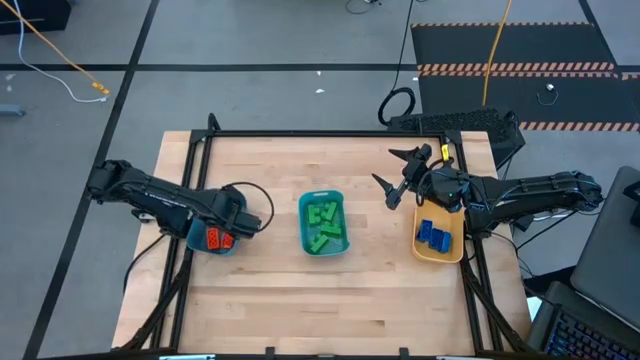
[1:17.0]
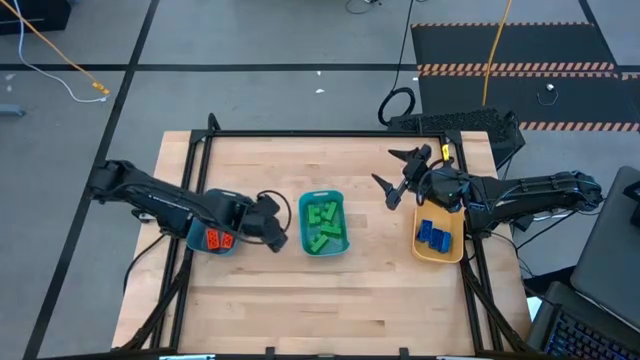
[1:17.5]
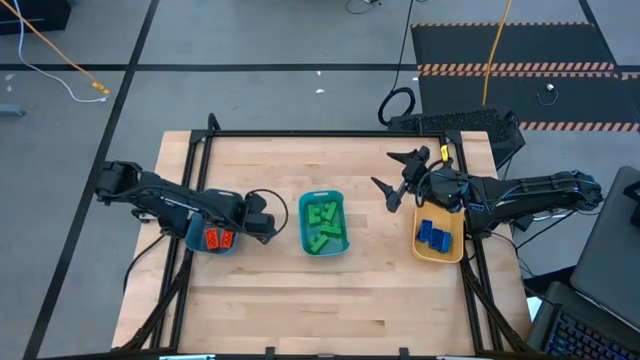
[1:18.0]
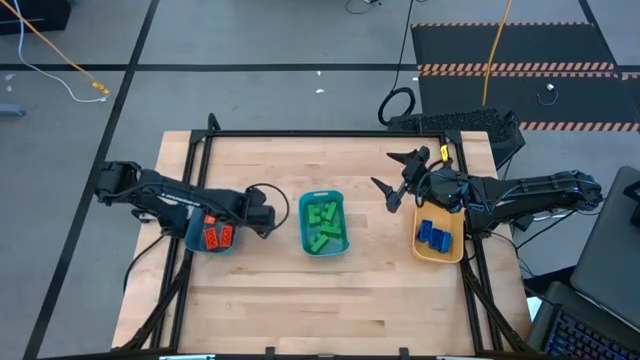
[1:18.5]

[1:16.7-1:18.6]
Task: Sort & place blocks by color
Adjust the dark blue bin

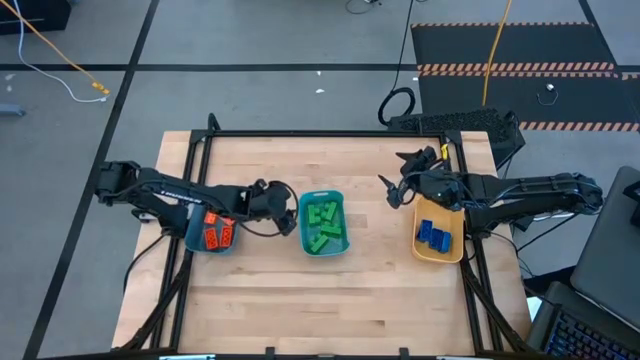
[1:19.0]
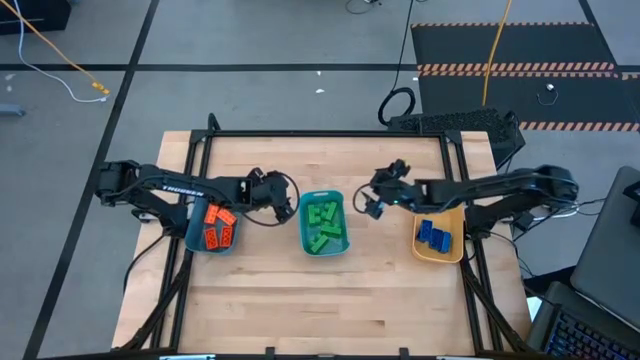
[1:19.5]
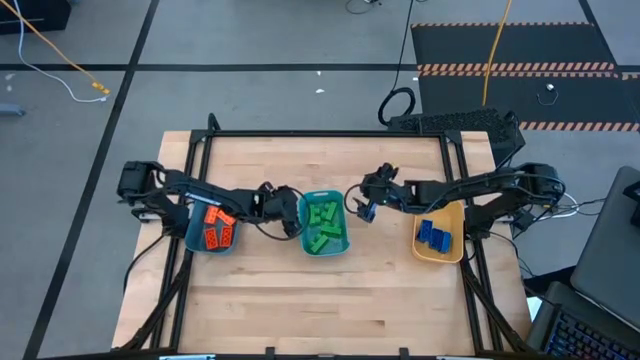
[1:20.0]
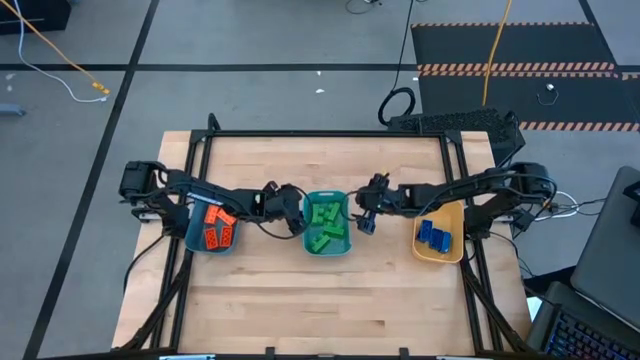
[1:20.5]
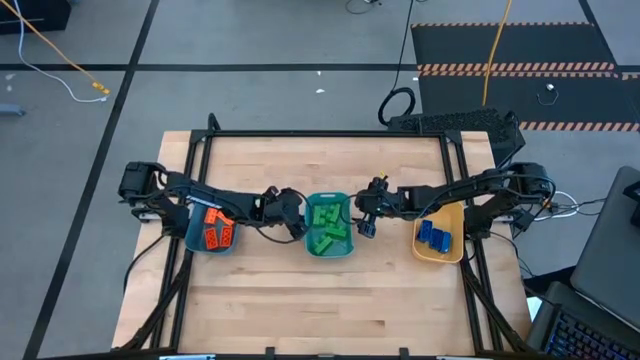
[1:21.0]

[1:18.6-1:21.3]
Adjust the light blue bin

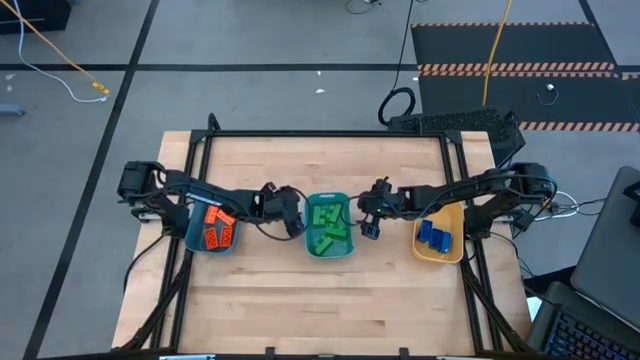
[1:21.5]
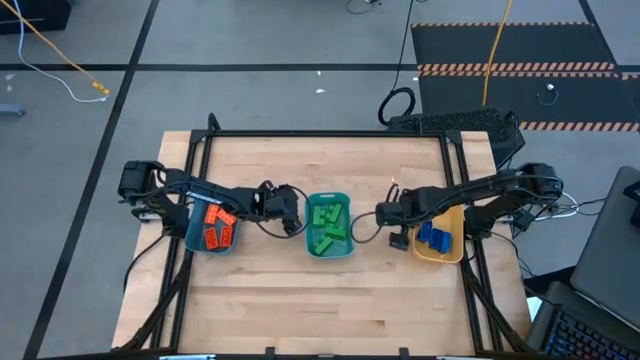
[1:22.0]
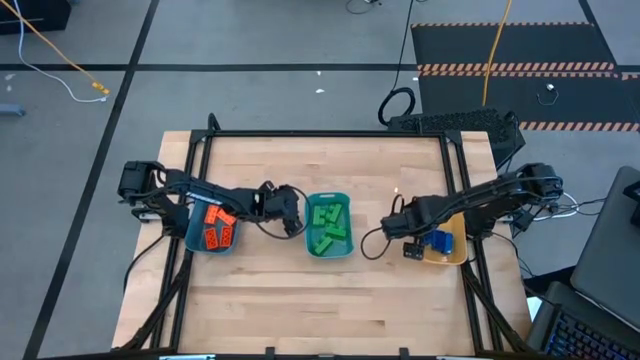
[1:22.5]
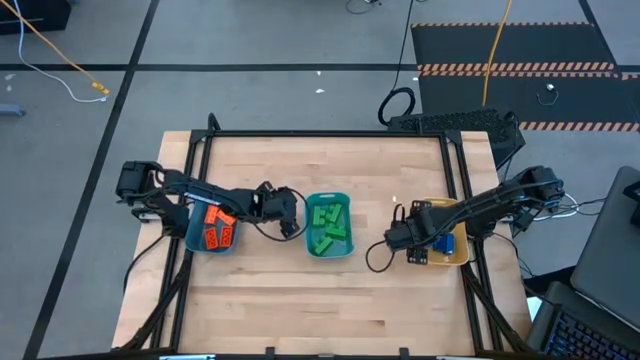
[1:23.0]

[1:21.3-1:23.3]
Adjust the yellow bin

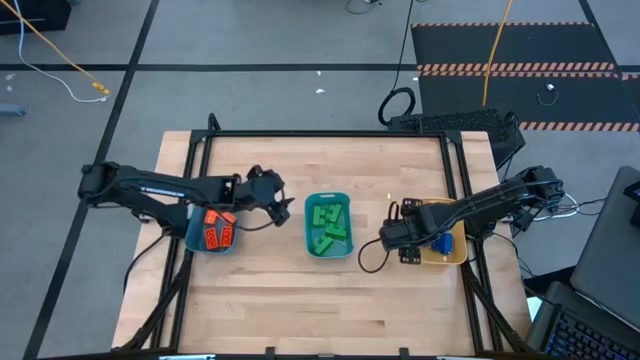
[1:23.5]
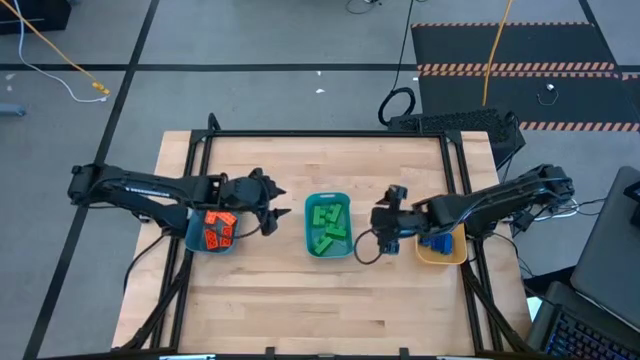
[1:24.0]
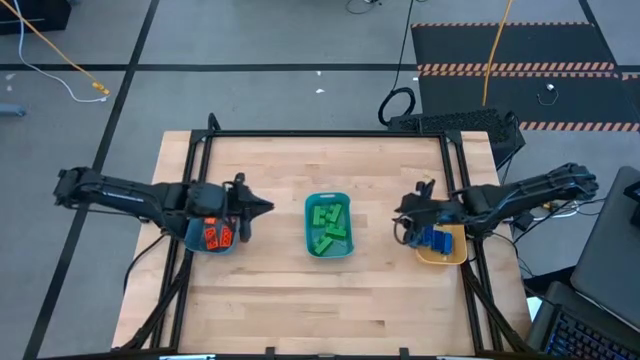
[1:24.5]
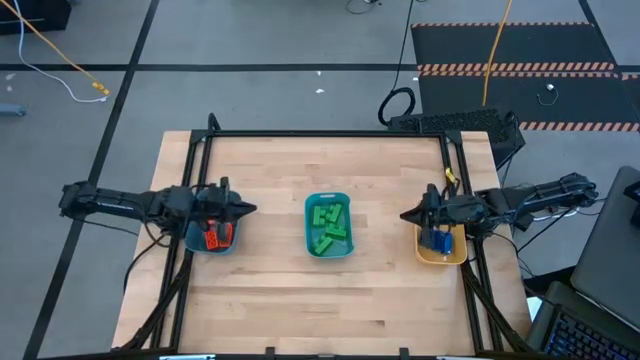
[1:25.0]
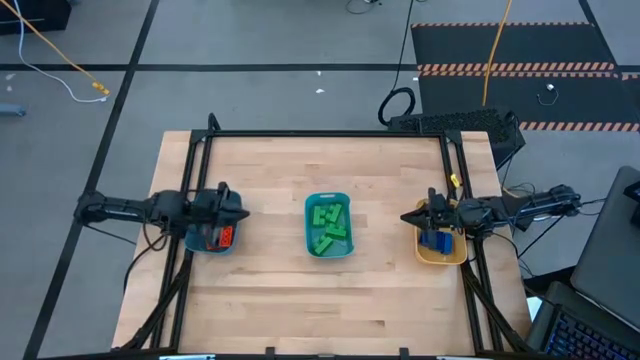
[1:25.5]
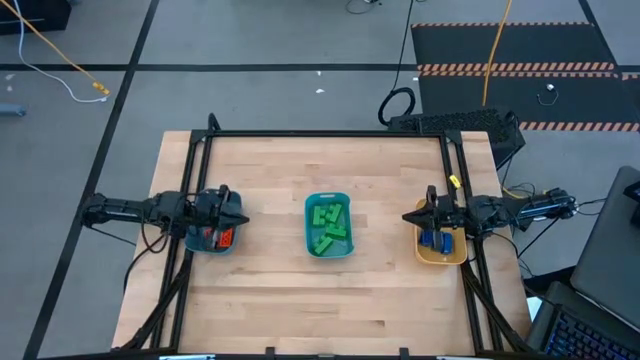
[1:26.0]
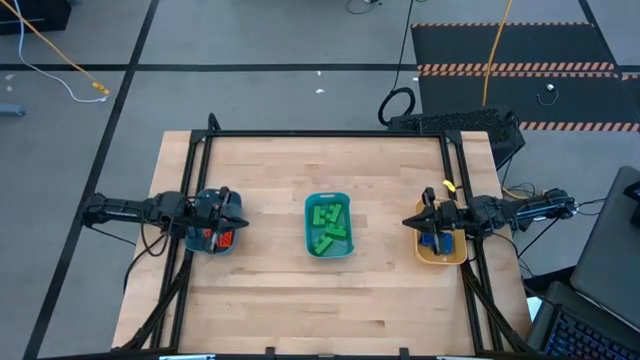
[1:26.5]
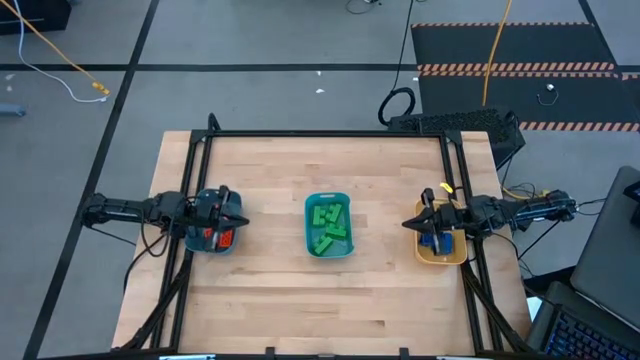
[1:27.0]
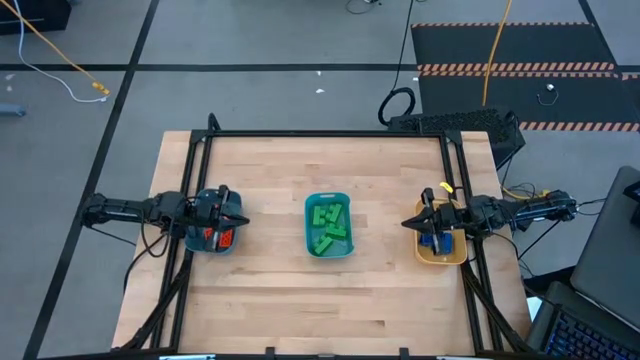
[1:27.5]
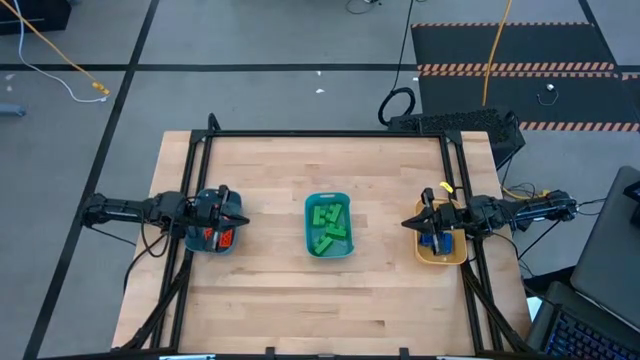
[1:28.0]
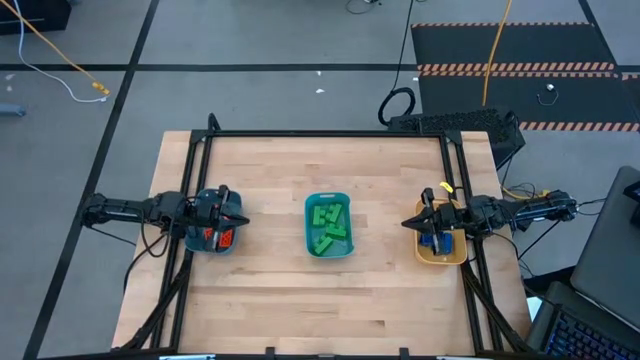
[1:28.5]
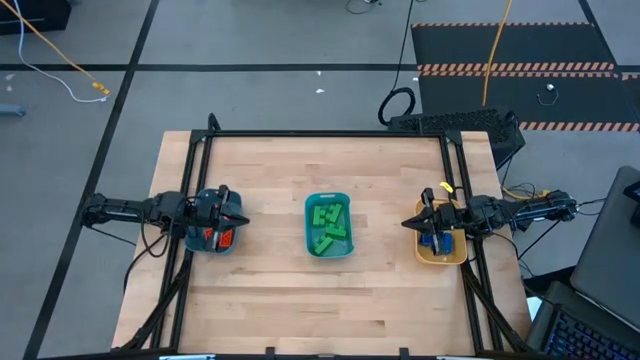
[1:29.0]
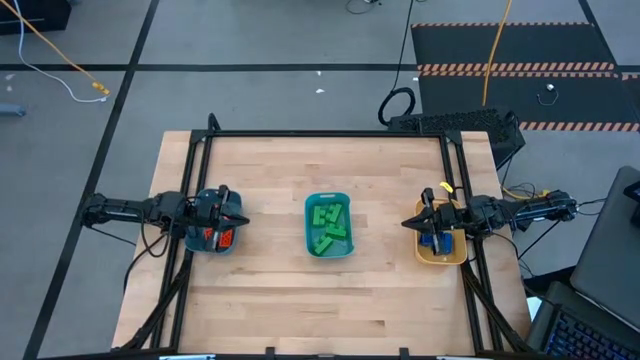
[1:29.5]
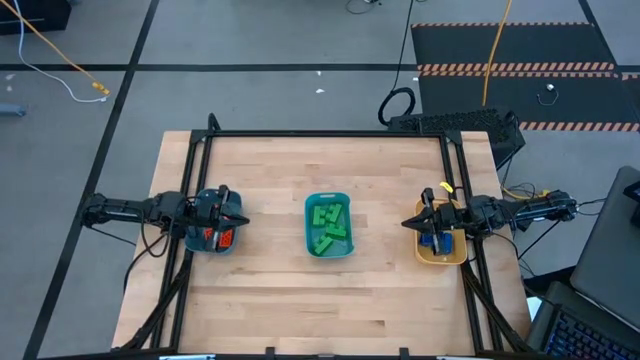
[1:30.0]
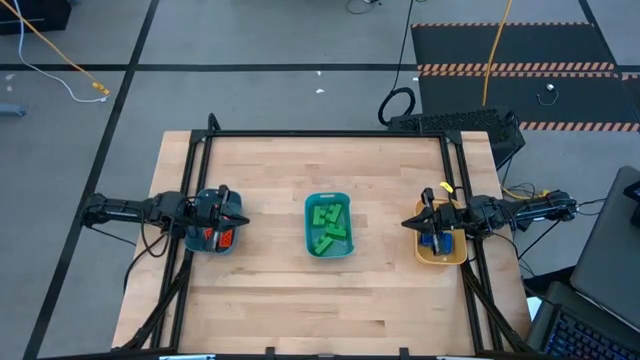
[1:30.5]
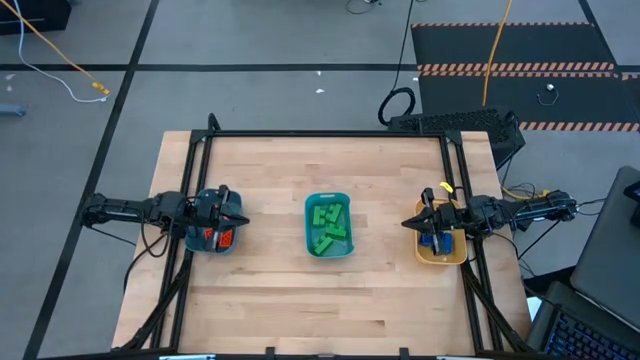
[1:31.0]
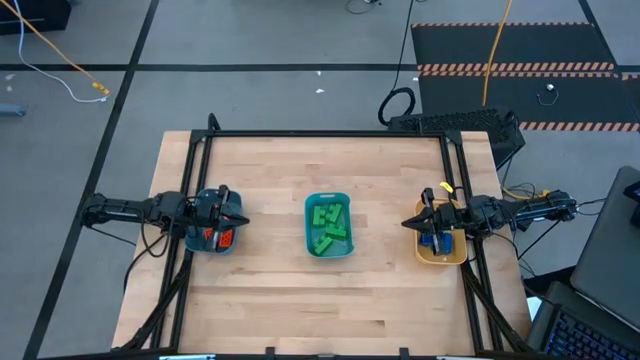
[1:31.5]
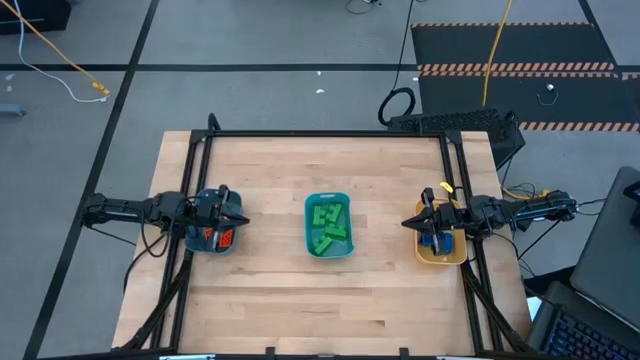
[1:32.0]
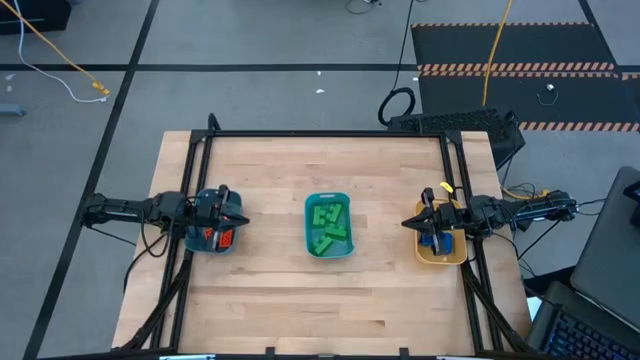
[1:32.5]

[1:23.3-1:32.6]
Return to home position

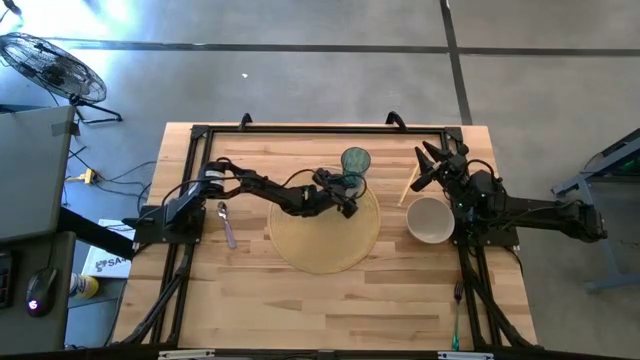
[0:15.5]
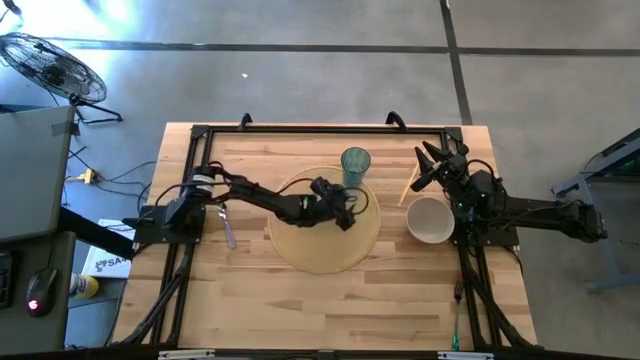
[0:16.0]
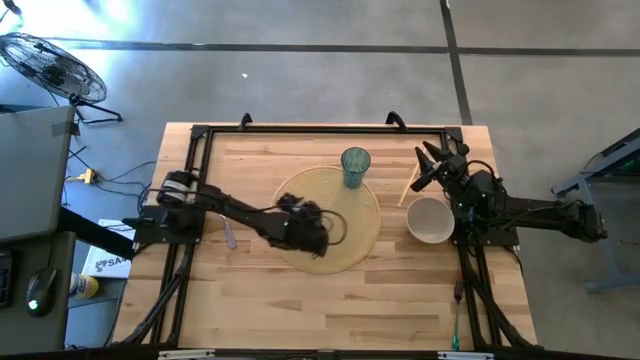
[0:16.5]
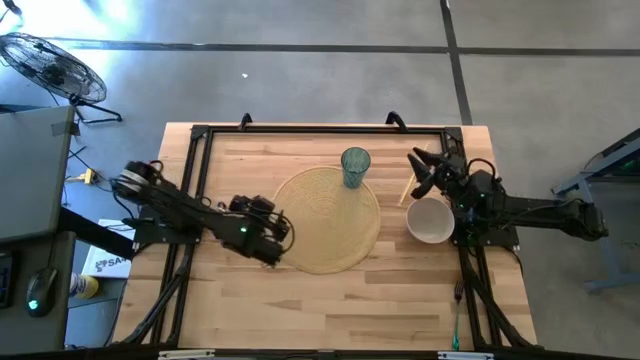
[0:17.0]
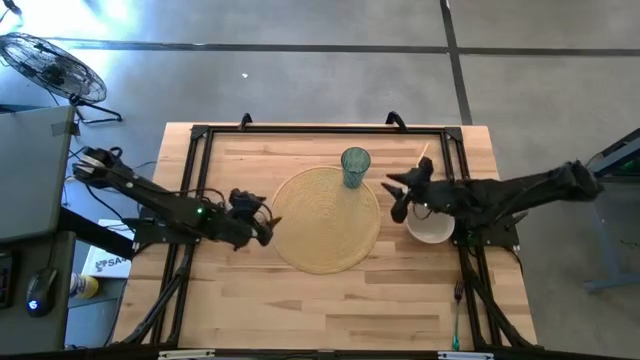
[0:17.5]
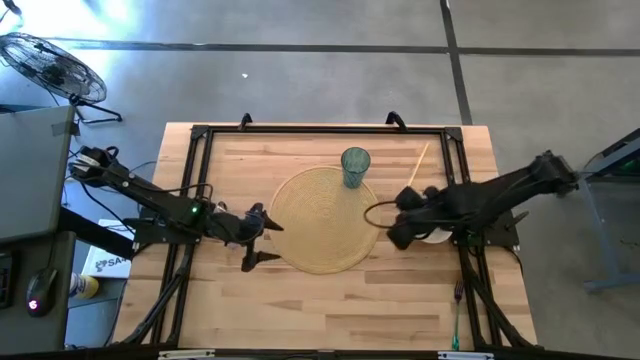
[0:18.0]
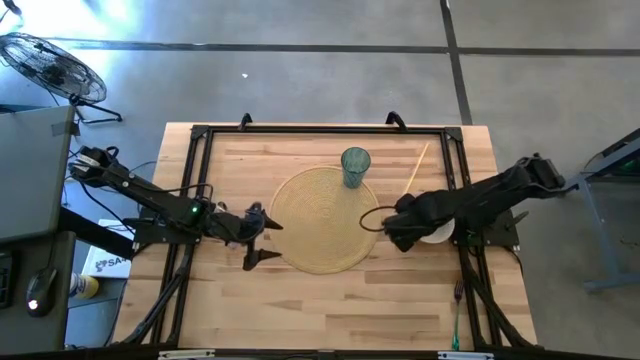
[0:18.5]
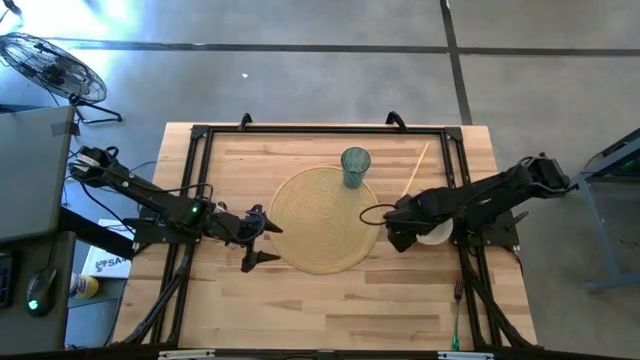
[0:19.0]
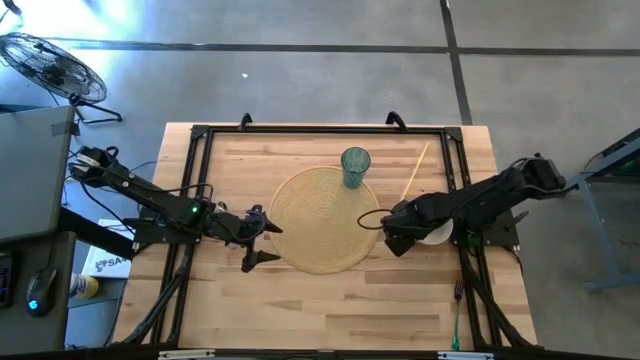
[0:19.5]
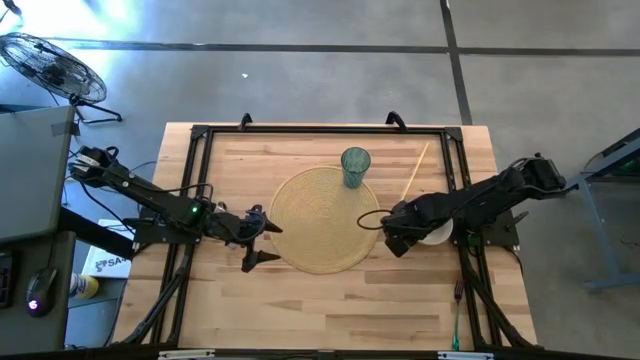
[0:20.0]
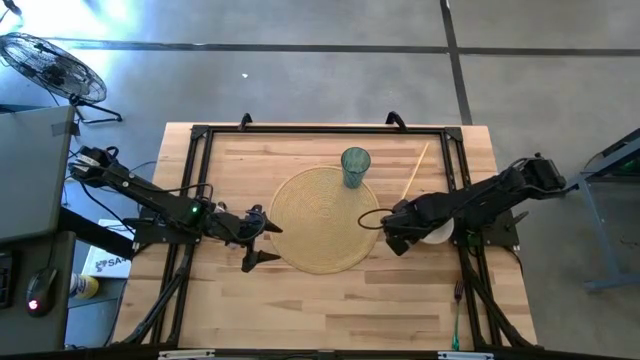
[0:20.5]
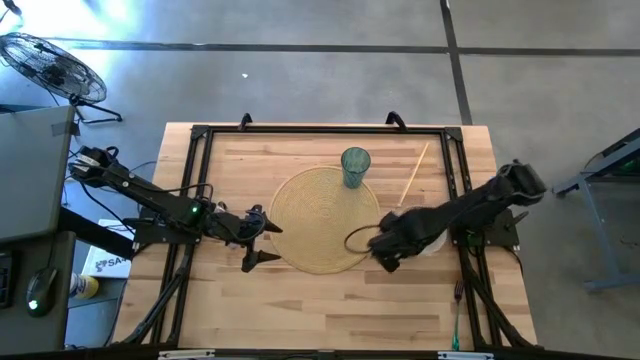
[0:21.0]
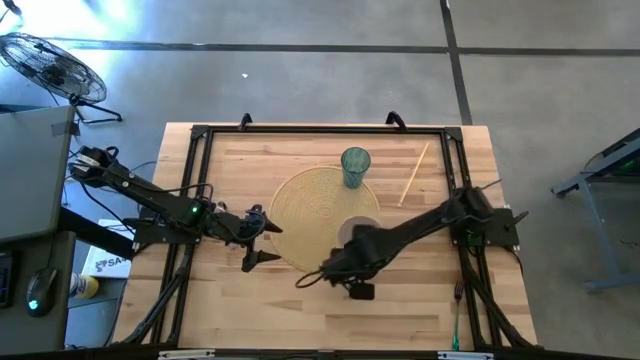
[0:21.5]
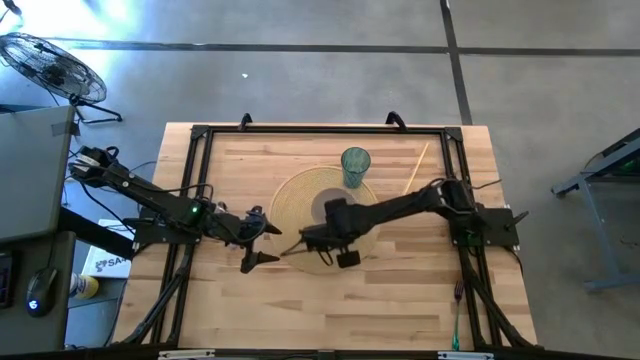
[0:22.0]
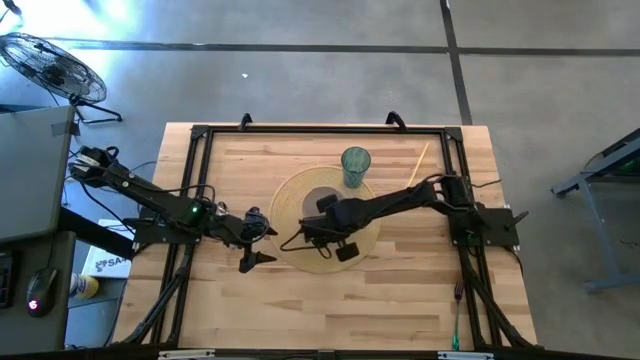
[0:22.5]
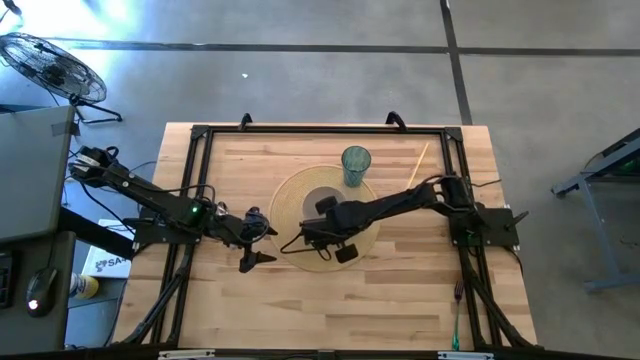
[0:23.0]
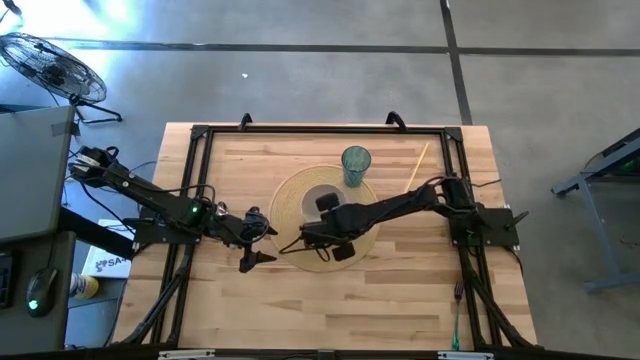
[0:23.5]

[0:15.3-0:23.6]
Task: Pick & Place Utensil
Put the white bowl on the brown tablemat below the blue cup
